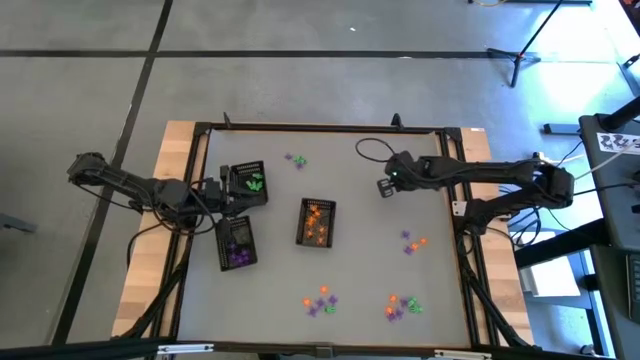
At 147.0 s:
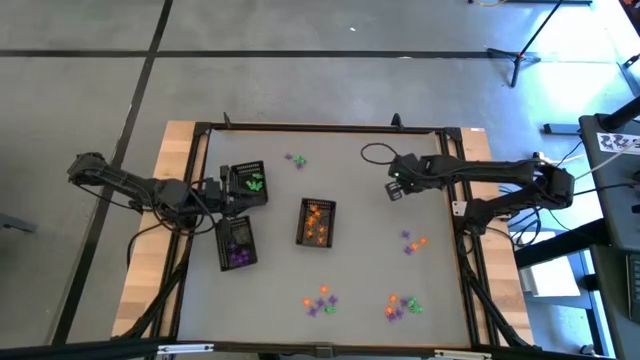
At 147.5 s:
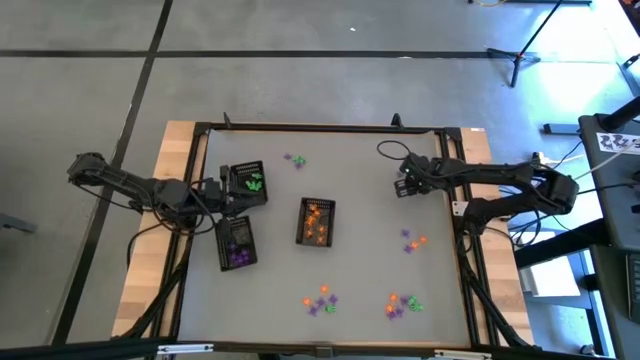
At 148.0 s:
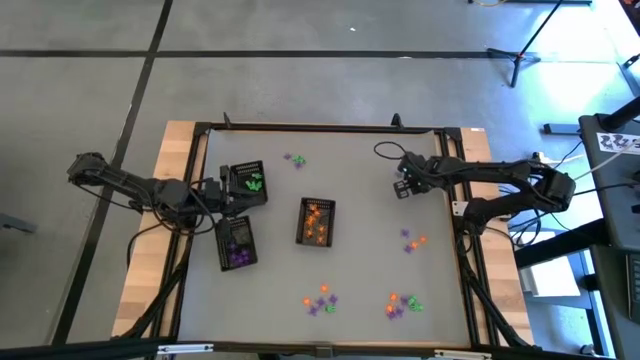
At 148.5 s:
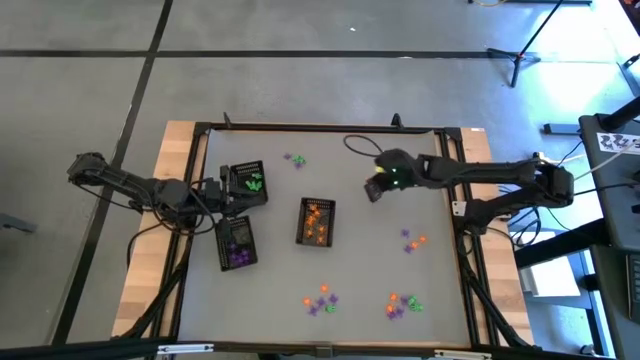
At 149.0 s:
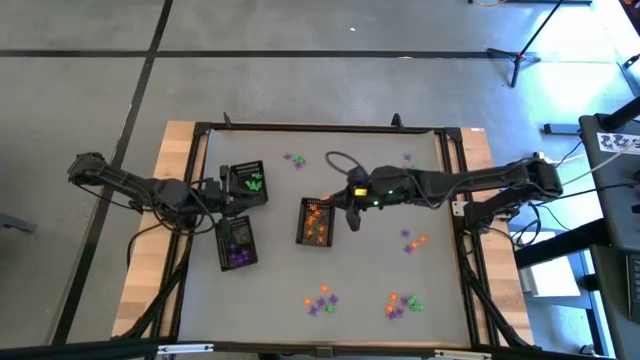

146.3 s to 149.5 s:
Task: Sort Halloween decoration
Put the orange spider toy into the bottom right black basket

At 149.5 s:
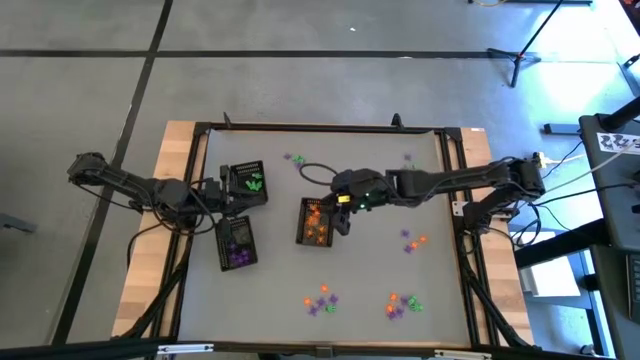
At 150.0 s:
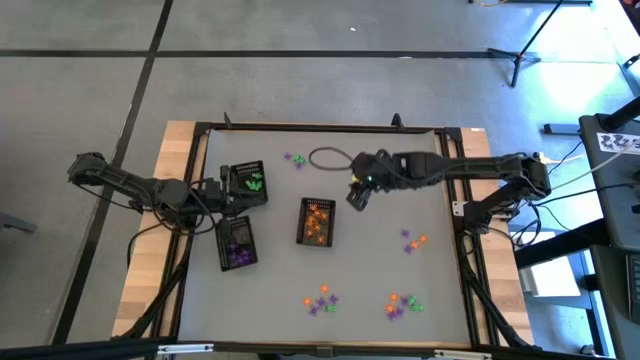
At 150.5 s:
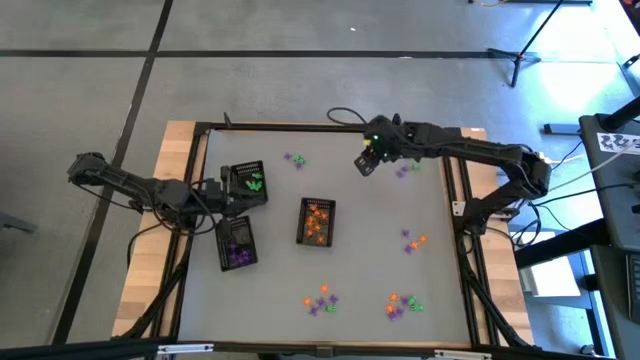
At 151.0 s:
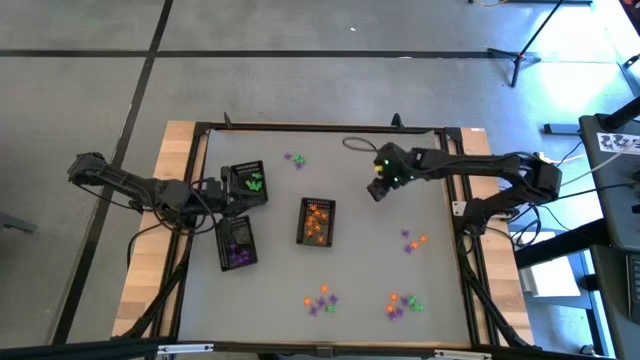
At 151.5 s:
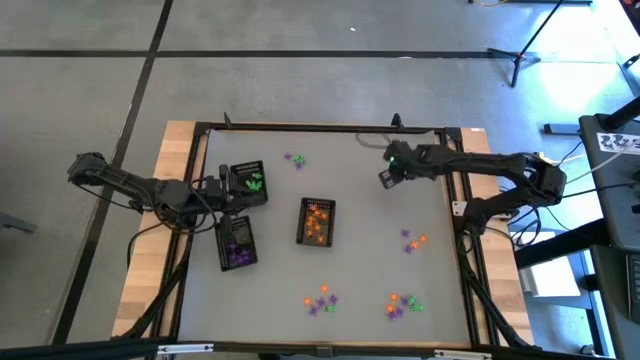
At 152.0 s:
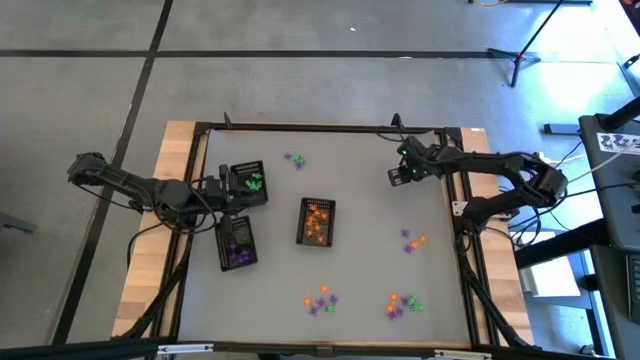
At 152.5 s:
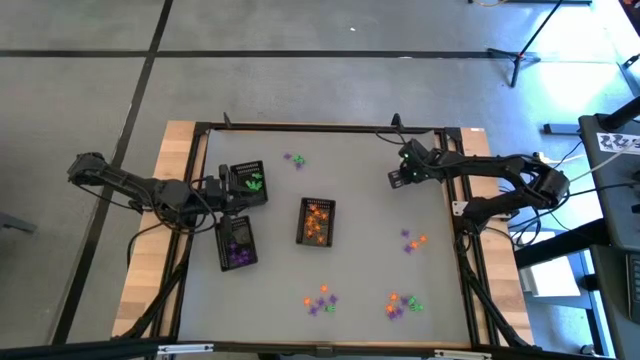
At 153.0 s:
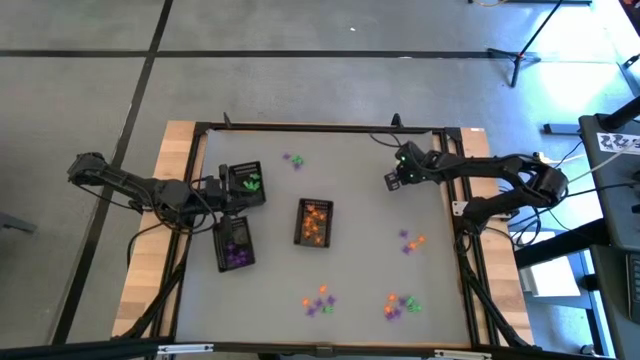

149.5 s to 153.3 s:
Put the purple spider toy into the bottom left black basket

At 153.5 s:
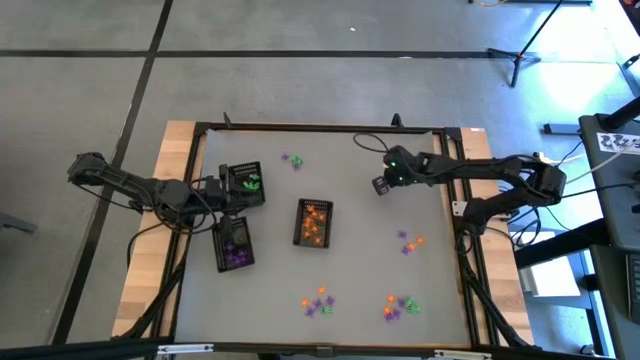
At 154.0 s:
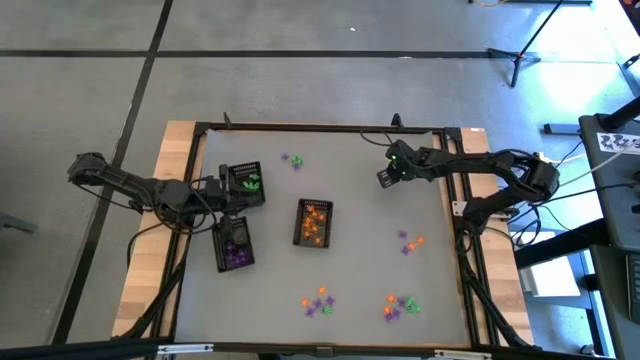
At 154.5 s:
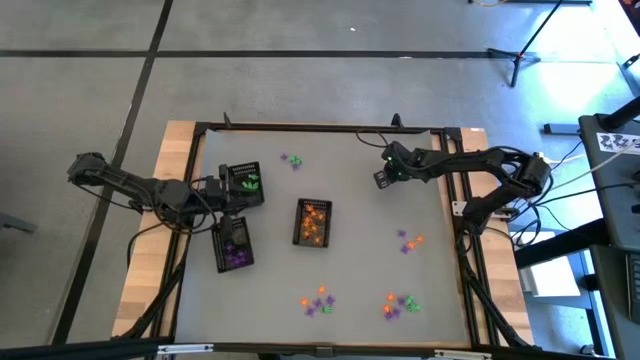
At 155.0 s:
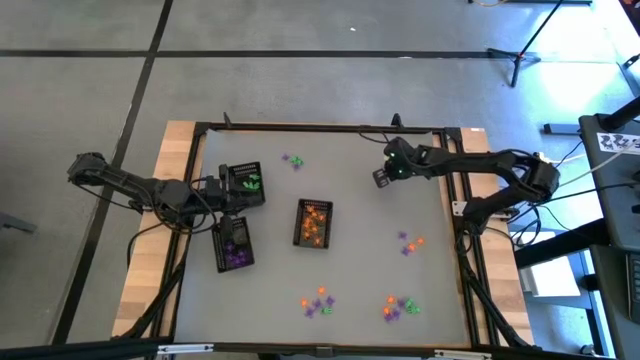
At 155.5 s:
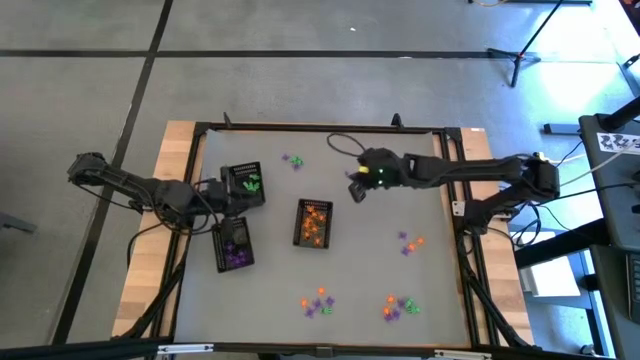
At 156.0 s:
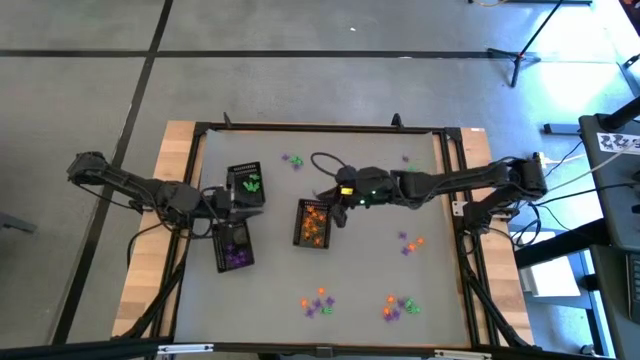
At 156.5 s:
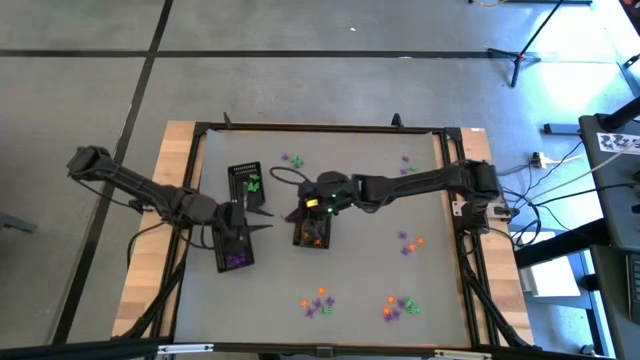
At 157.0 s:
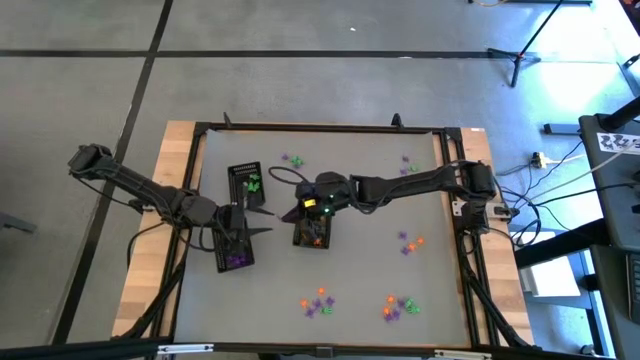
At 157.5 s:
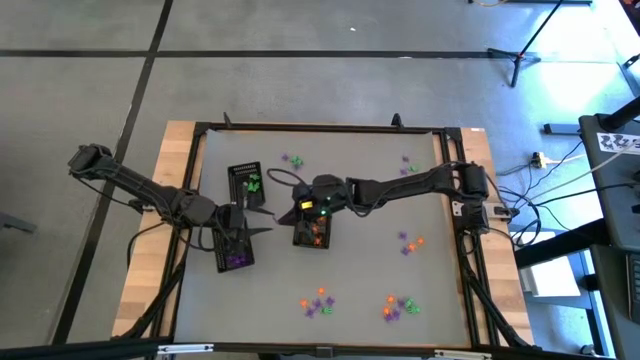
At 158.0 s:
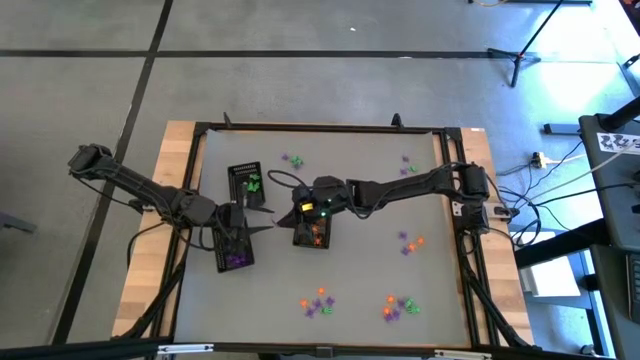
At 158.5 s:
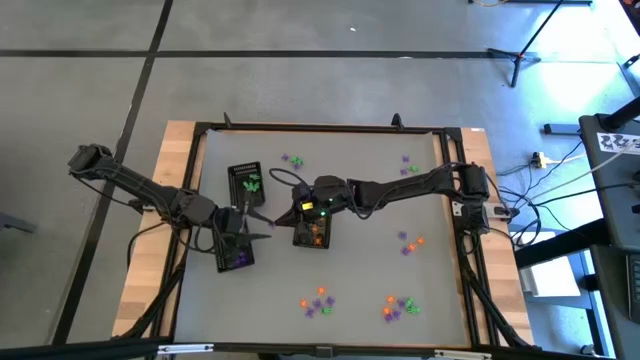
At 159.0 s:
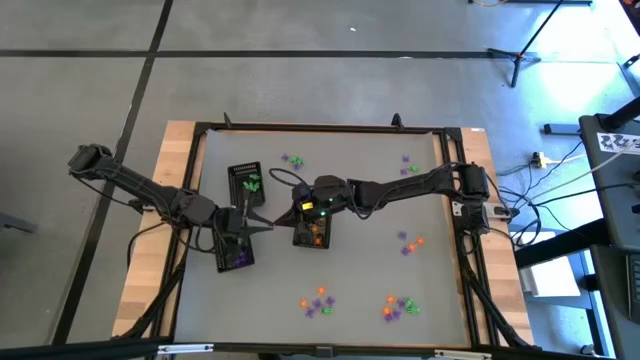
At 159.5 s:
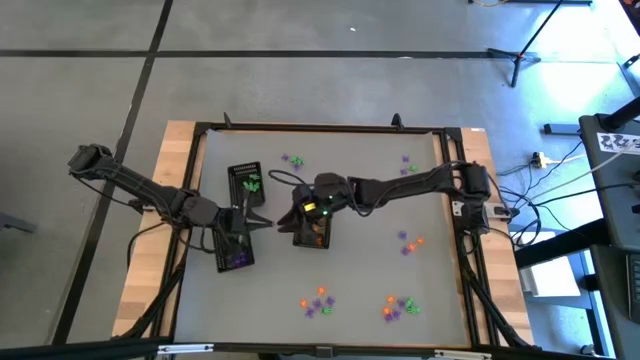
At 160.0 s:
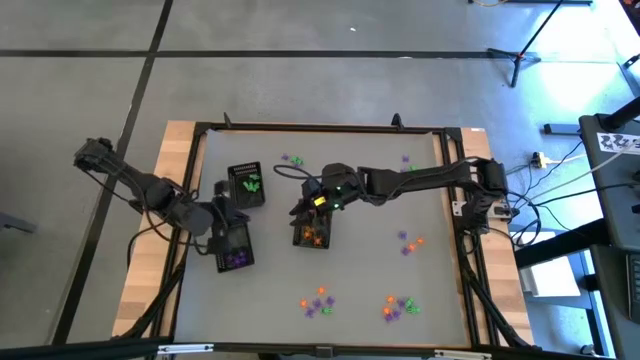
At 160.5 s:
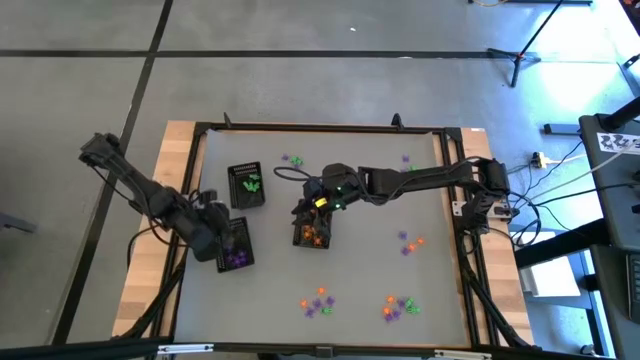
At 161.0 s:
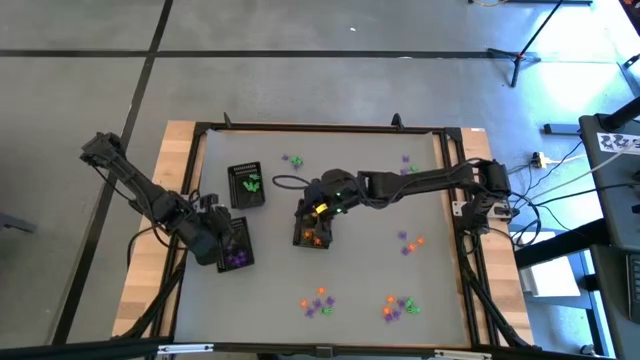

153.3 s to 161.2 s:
Put the purple spider toy into the bottom left black basket

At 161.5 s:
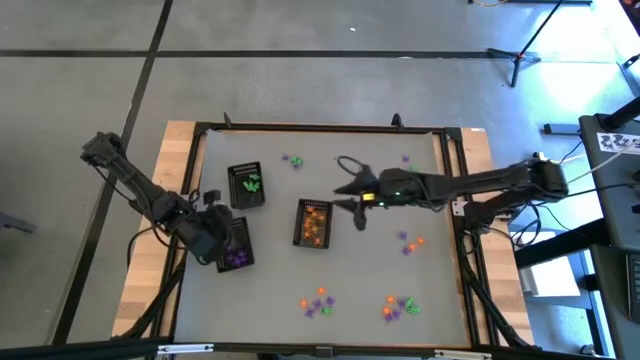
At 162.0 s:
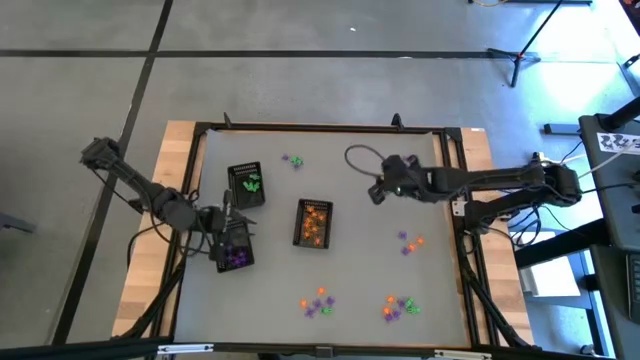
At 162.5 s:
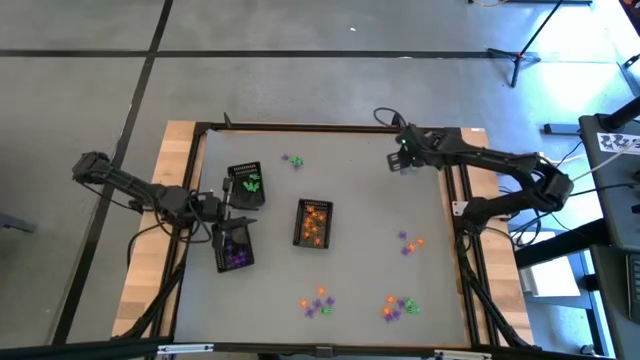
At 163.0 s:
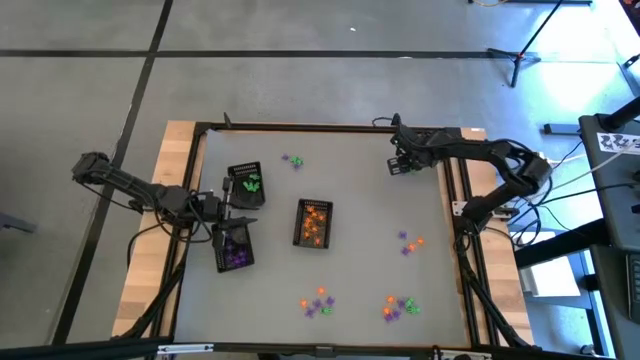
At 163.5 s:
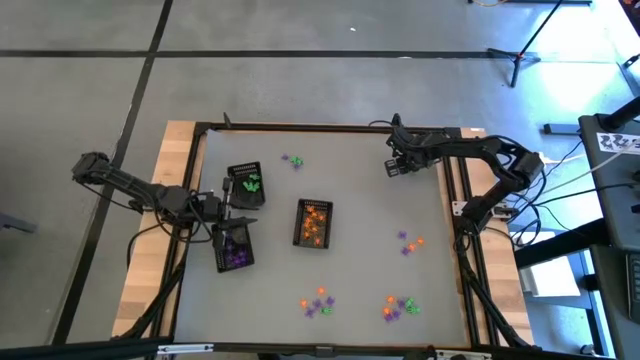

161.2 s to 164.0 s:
Put the green alien toy into the top left black basket

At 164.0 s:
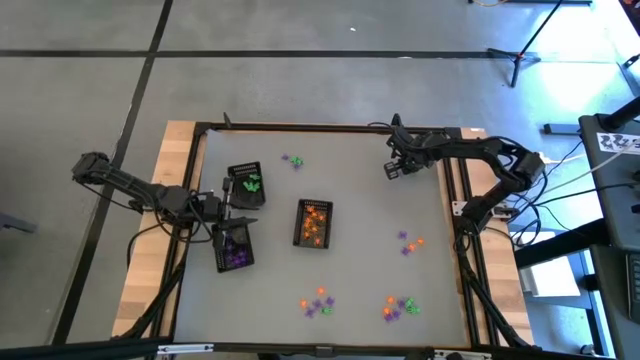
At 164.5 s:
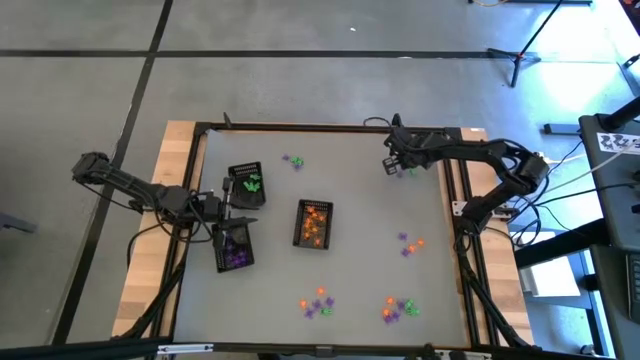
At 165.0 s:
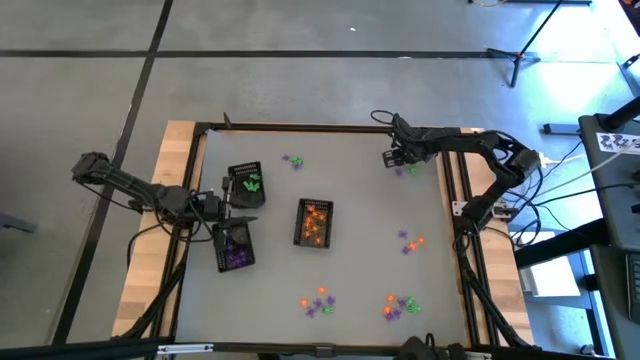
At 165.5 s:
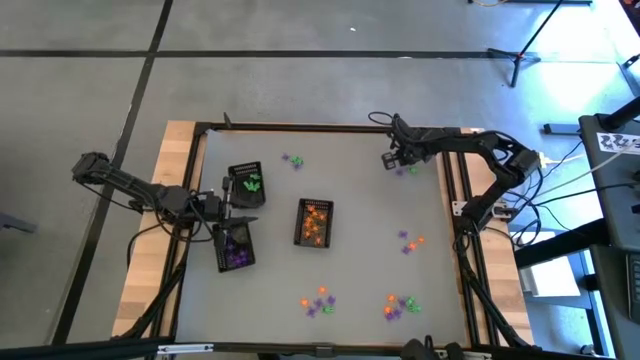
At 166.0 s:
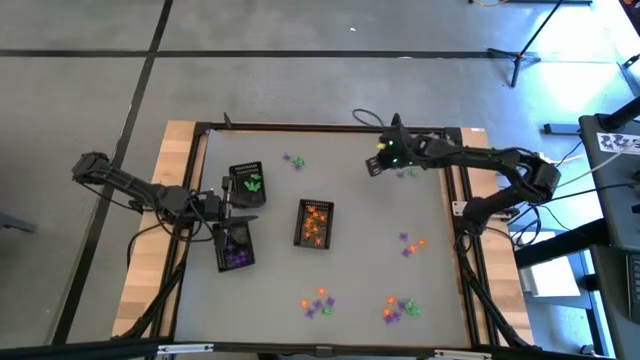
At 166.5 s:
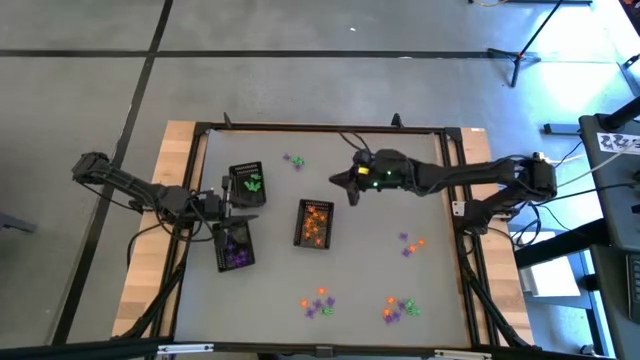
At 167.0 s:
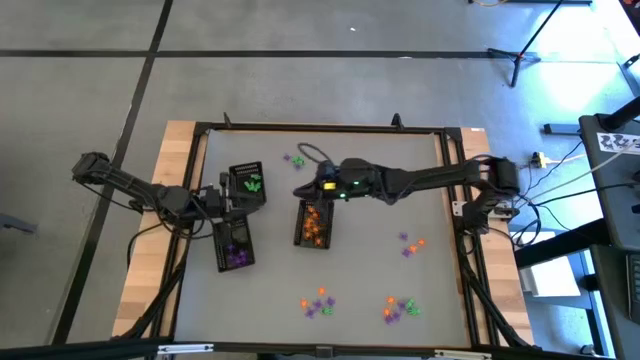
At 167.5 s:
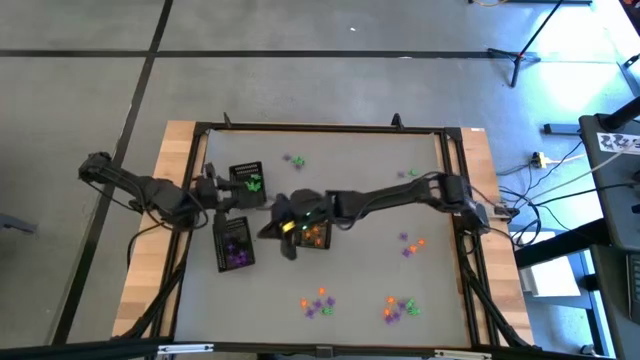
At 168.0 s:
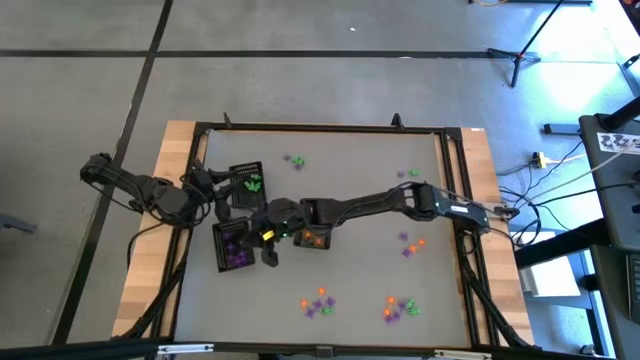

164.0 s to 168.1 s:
Put the purple spider toy into the bottom left black basket
